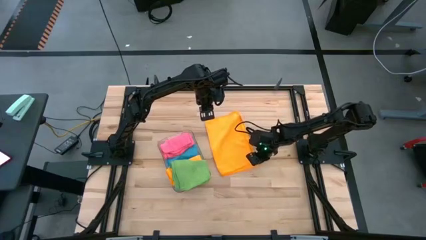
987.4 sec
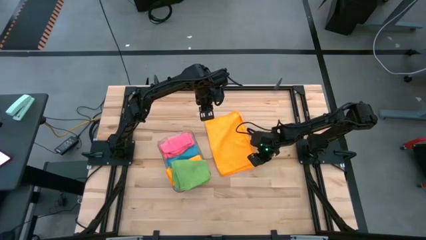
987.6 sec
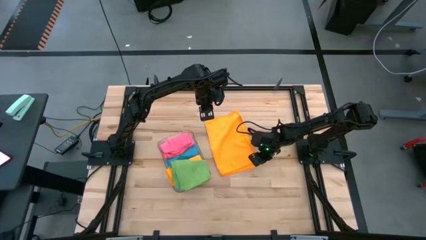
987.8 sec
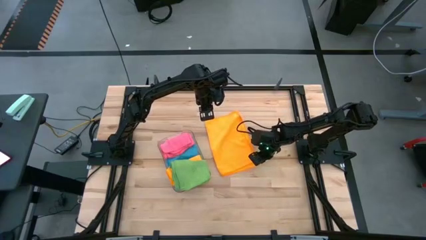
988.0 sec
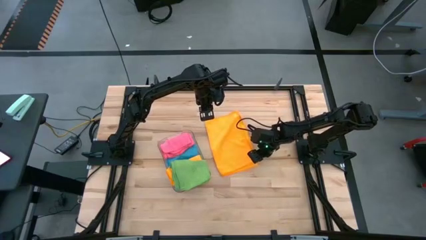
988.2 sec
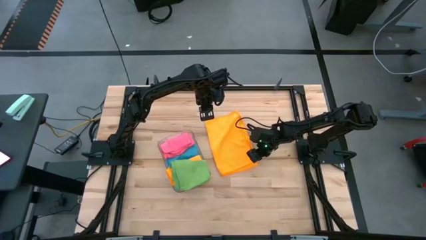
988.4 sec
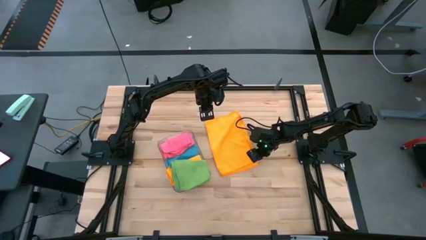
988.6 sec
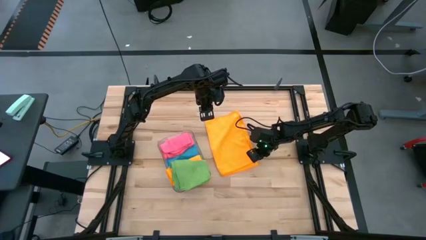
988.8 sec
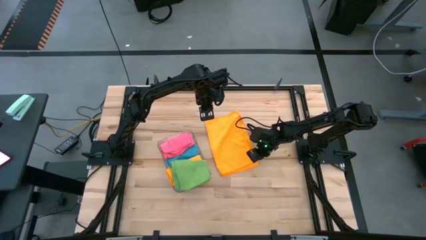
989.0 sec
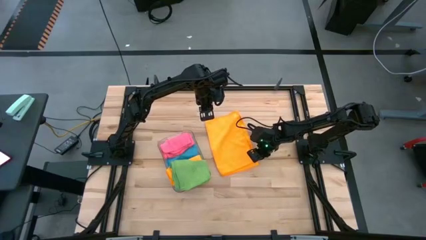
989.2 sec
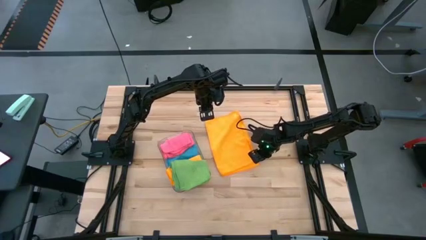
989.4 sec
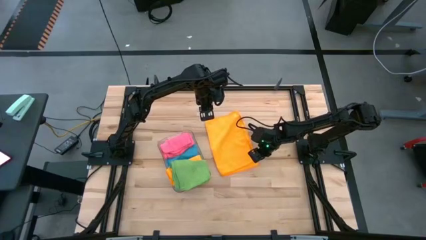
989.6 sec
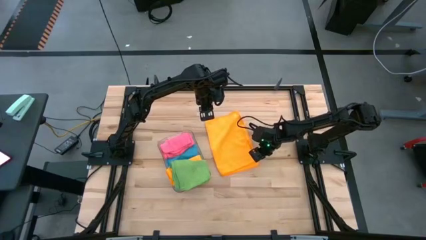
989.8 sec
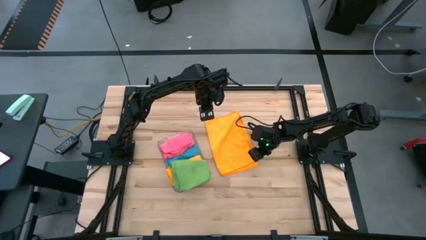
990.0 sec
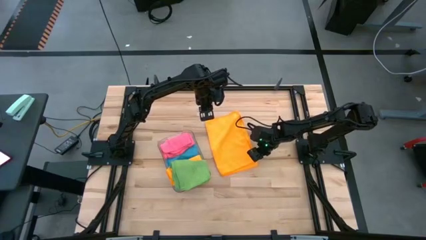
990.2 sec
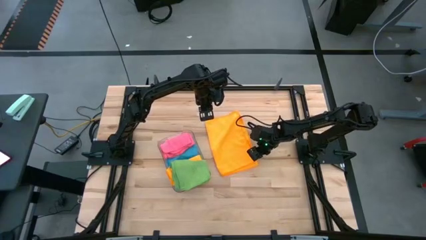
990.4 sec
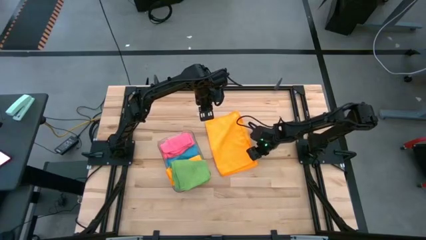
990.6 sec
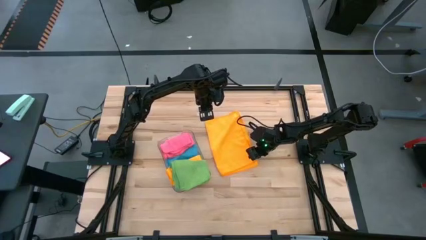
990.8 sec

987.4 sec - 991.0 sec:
Task: Fold microfiber towels
Fold the yellow towel

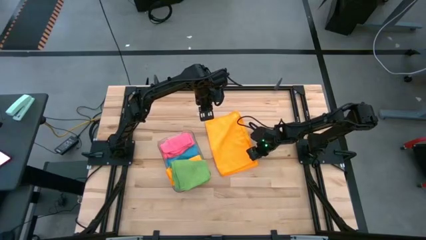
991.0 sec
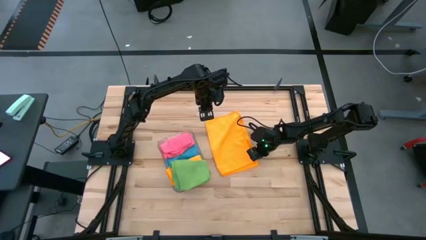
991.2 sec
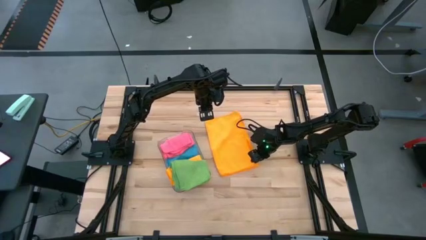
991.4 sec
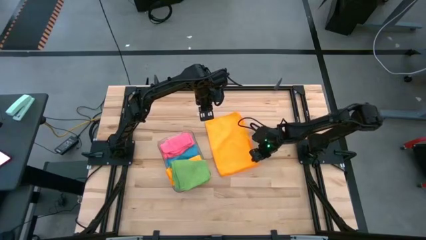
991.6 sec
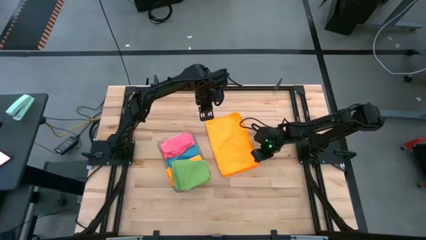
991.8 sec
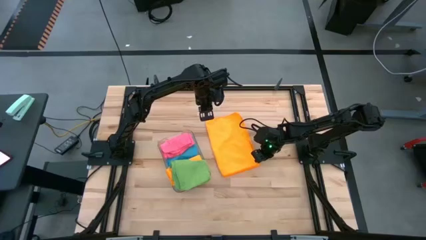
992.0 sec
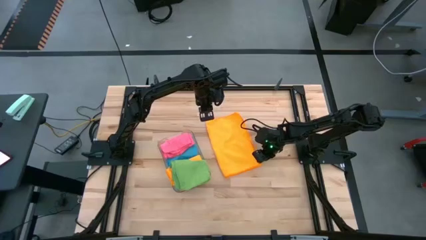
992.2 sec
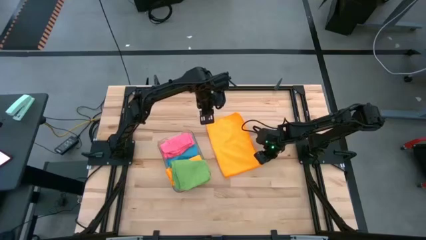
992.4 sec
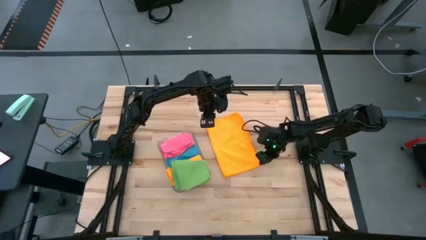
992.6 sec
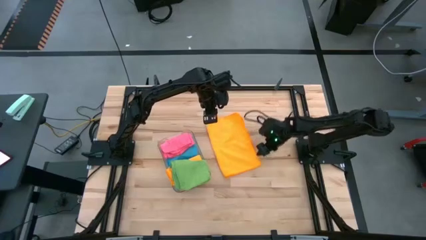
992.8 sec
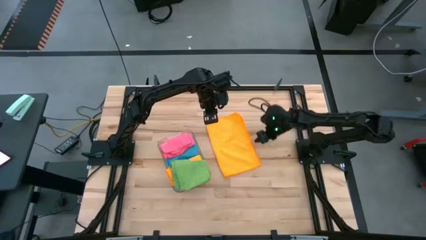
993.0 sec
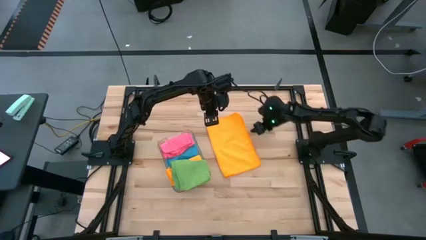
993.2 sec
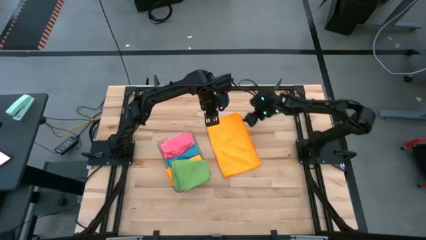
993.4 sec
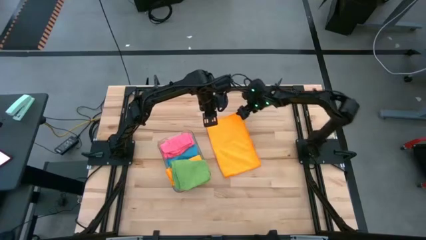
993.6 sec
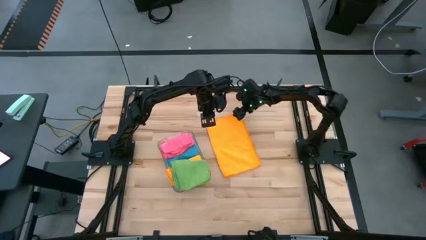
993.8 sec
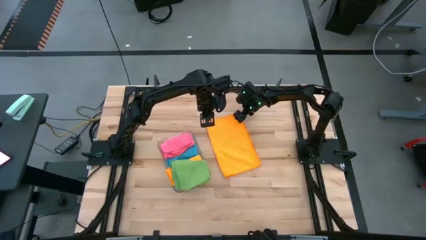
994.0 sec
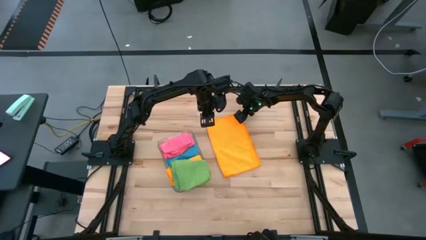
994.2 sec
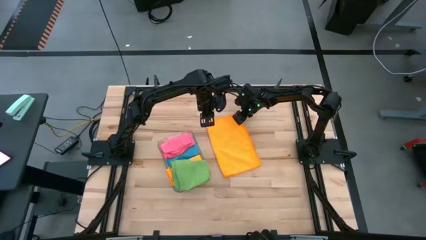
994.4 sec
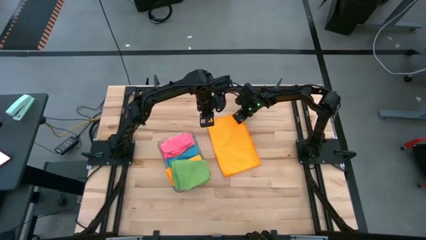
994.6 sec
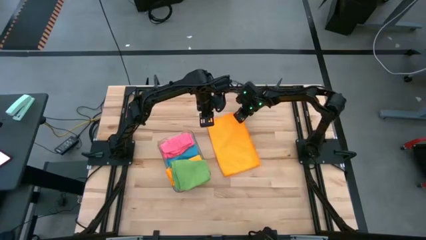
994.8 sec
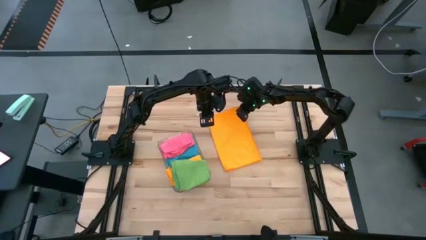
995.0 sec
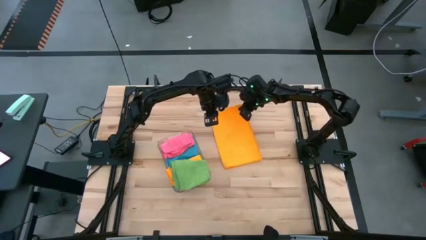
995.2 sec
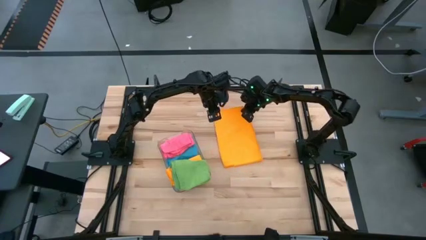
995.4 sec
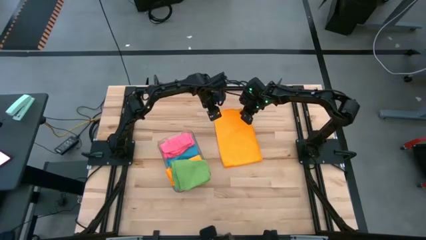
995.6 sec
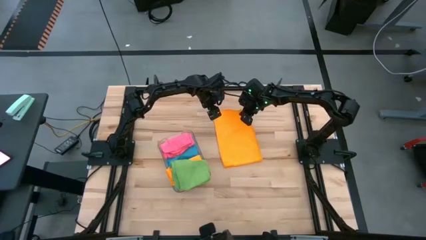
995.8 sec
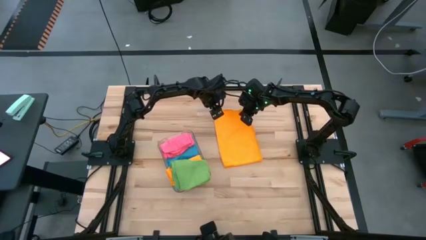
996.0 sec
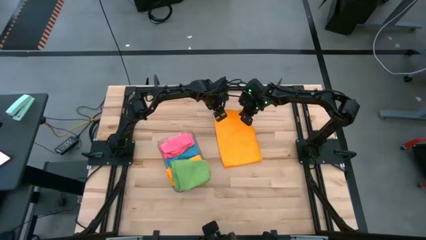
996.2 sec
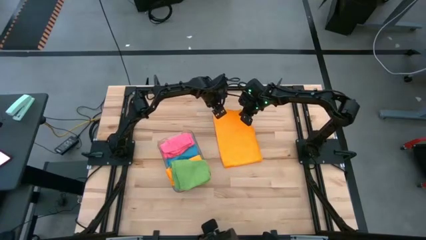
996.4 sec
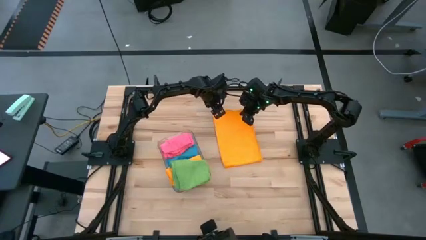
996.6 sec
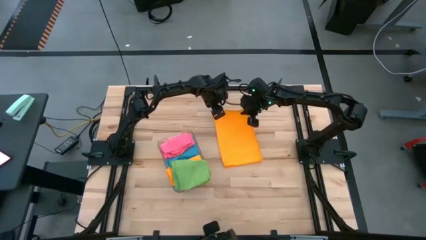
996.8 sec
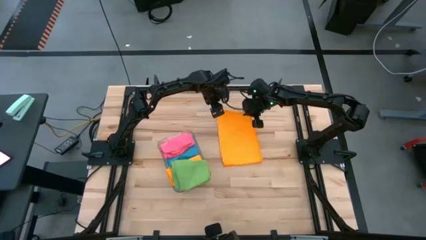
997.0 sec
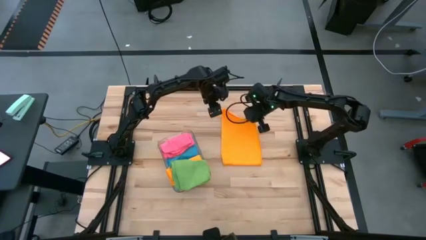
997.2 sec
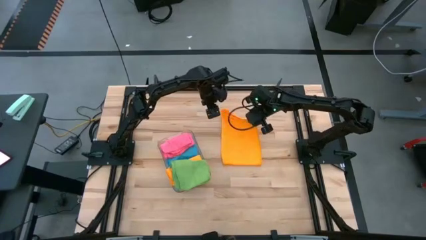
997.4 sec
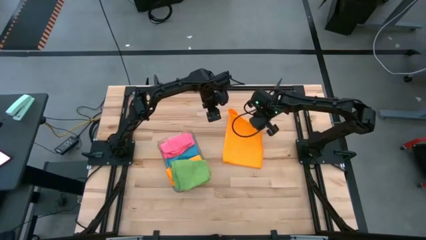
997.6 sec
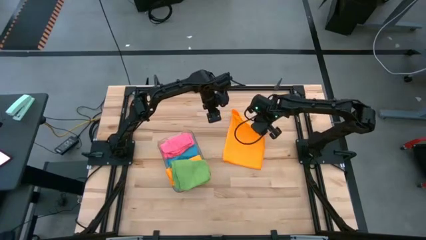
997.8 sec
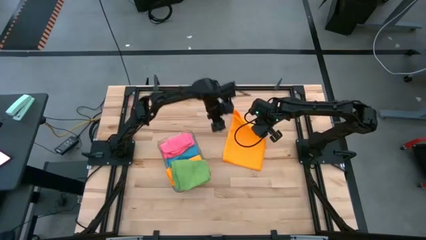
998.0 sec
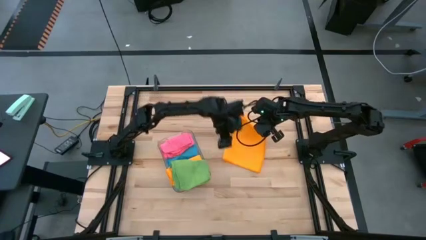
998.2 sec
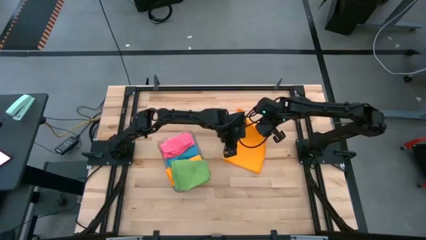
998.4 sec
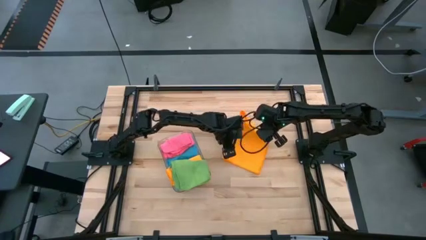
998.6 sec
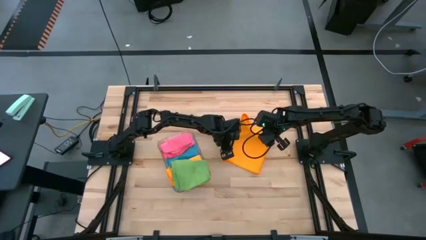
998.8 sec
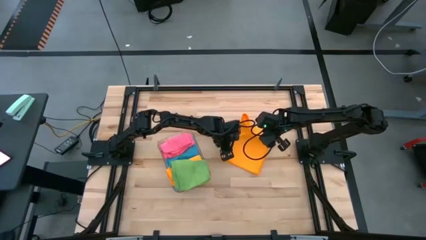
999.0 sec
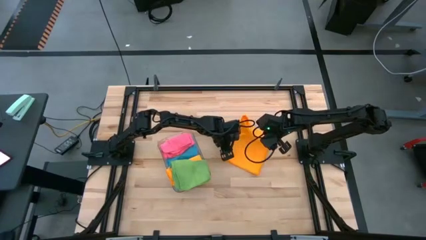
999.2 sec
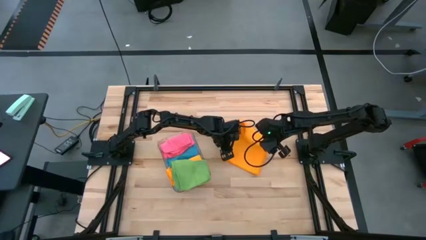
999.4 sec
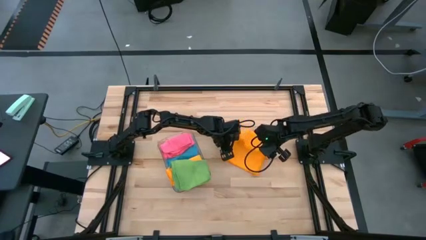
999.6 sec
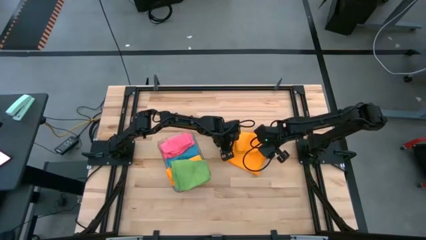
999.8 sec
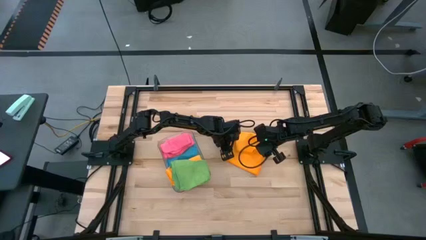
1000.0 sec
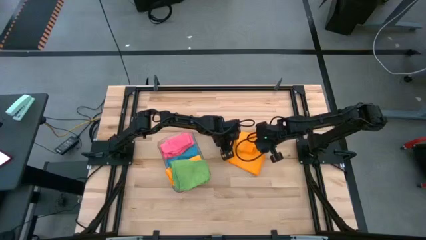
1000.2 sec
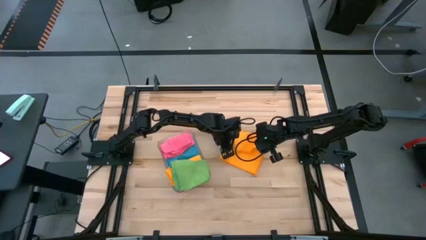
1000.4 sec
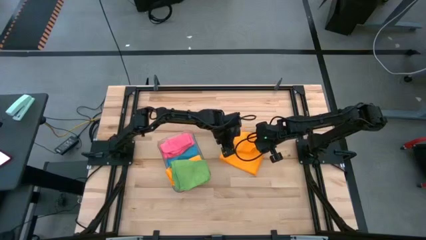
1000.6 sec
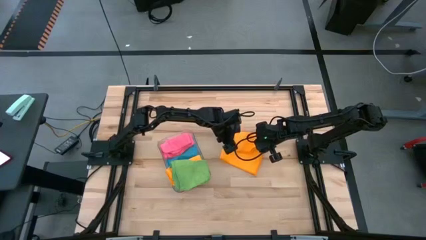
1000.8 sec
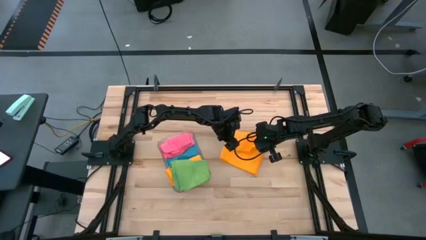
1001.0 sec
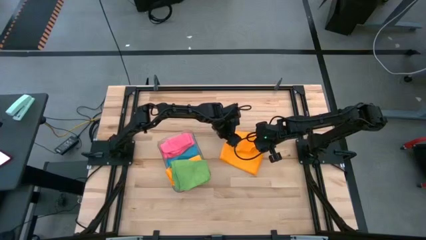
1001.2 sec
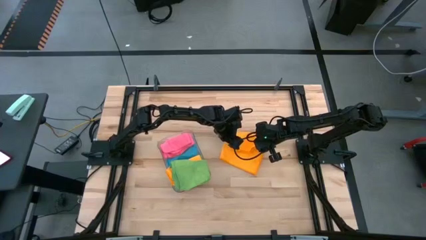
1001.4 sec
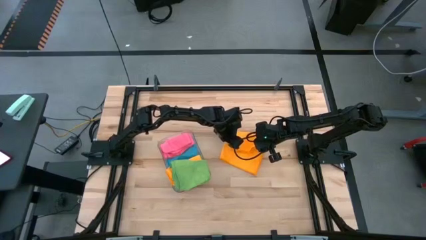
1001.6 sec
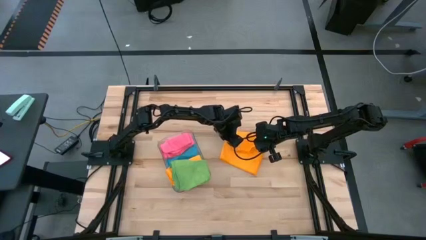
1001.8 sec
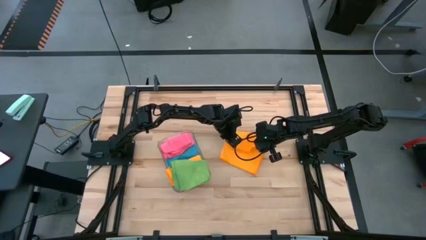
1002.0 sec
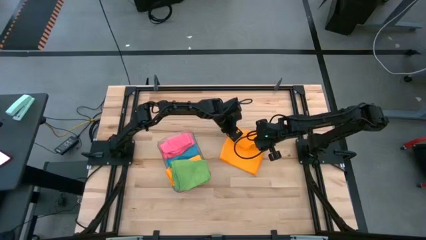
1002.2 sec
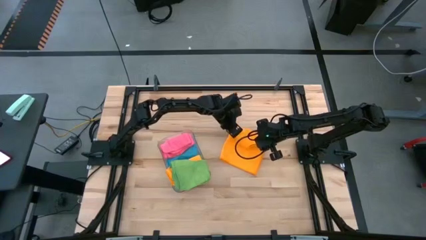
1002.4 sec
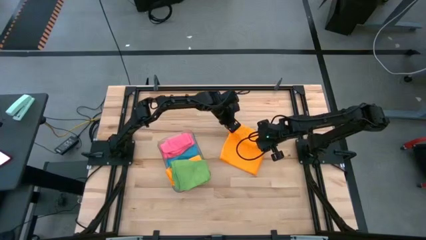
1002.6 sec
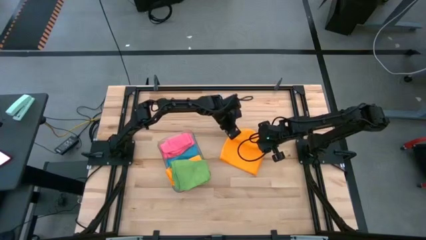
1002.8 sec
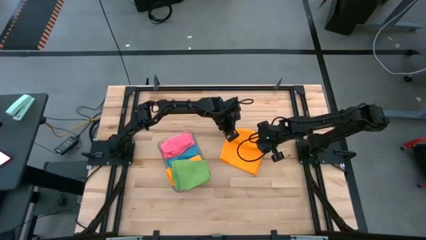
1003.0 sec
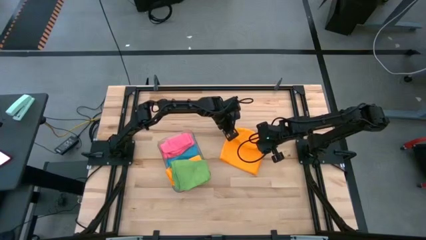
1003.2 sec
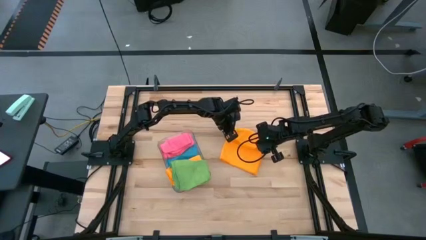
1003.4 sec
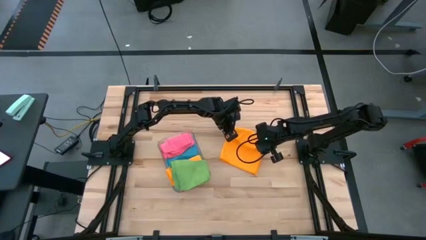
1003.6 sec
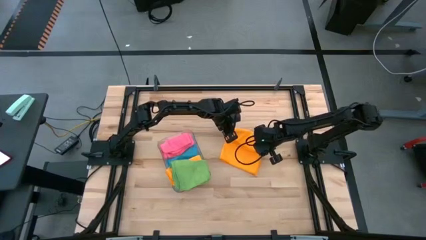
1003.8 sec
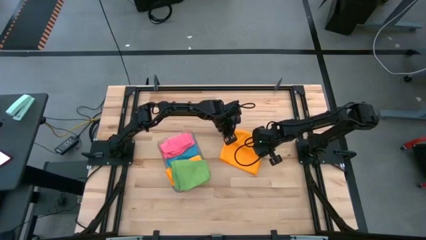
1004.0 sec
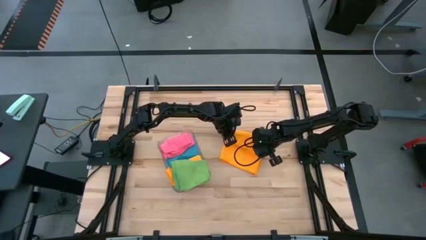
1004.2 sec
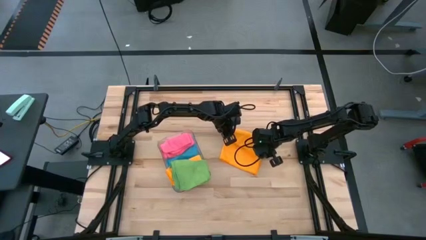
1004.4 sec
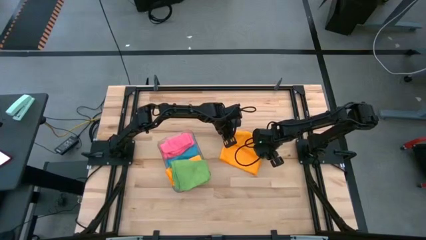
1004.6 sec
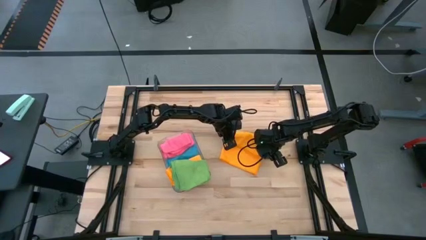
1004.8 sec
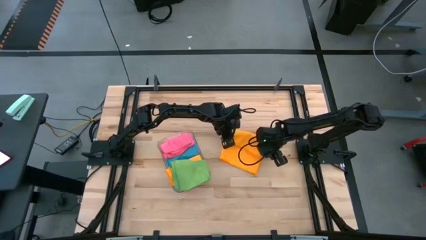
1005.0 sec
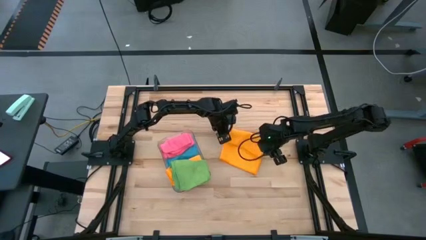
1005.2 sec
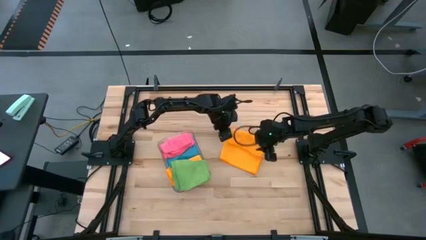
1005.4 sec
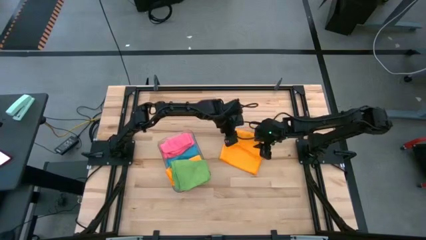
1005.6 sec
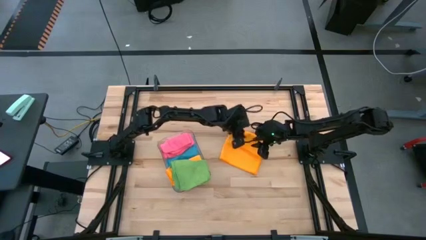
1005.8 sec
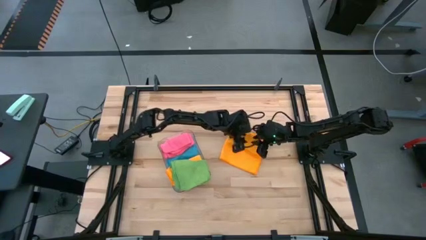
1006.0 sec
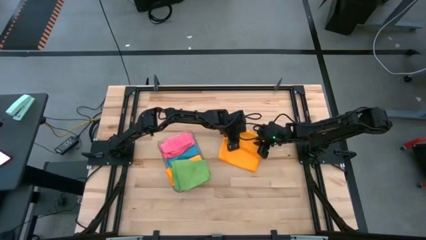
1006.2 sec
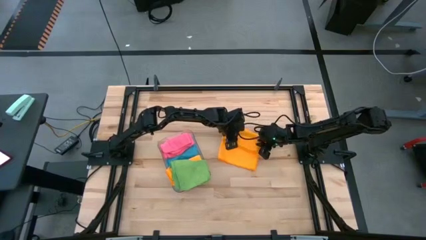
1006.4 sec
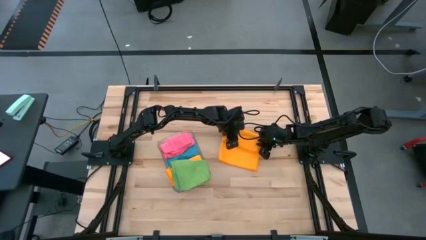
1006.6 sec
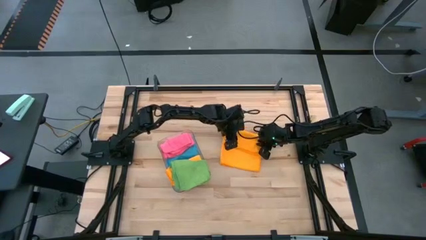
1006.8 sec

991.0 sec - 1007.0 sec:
Fold the yellow towel
